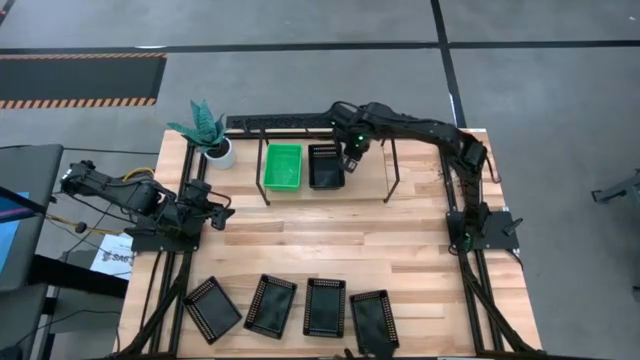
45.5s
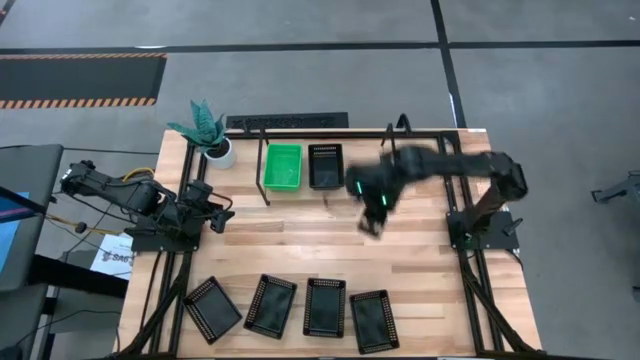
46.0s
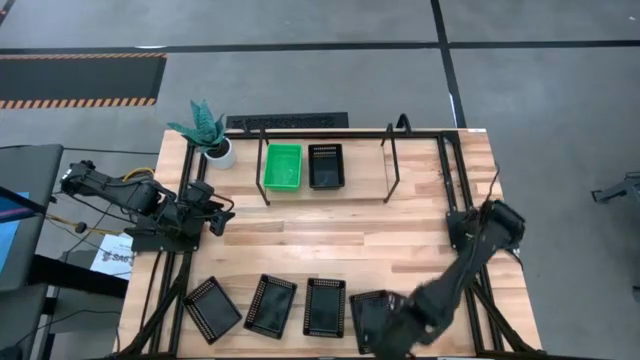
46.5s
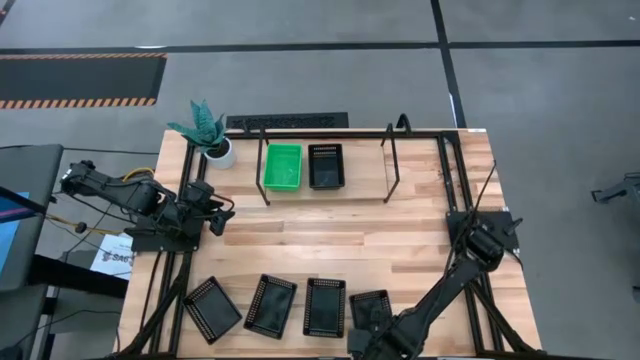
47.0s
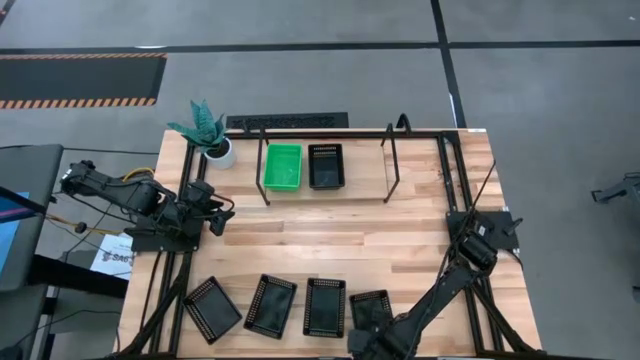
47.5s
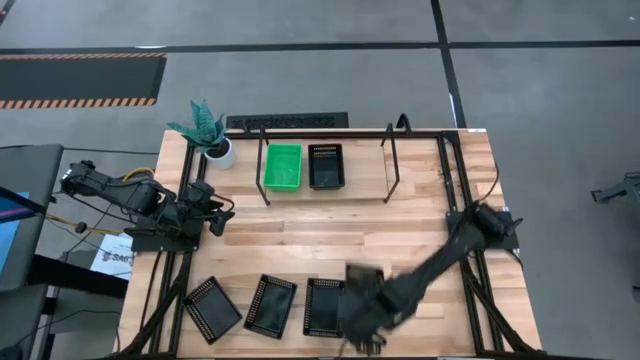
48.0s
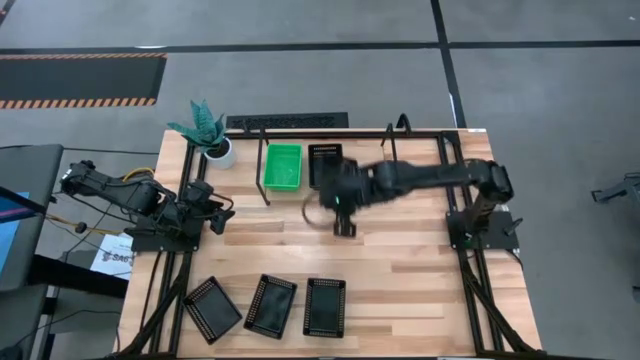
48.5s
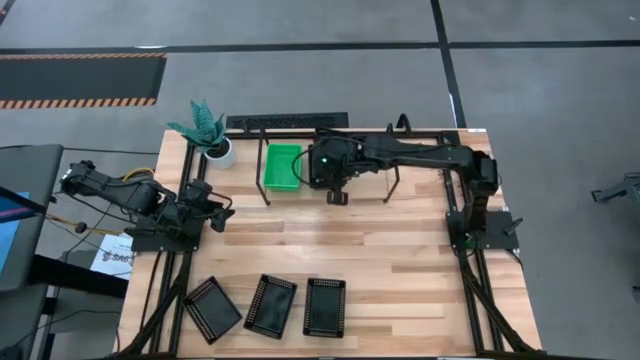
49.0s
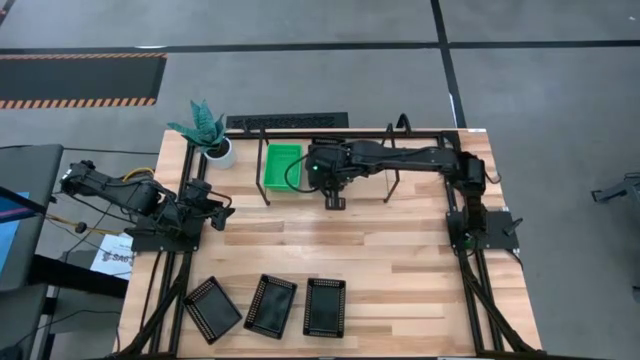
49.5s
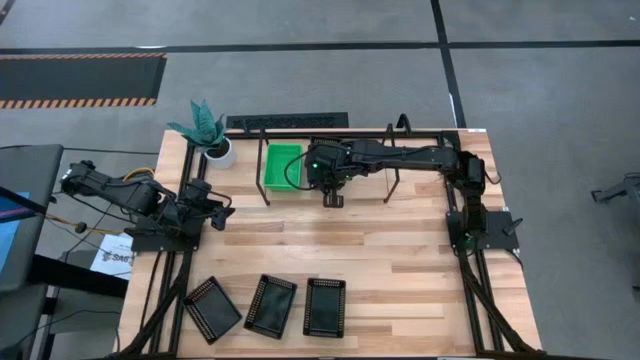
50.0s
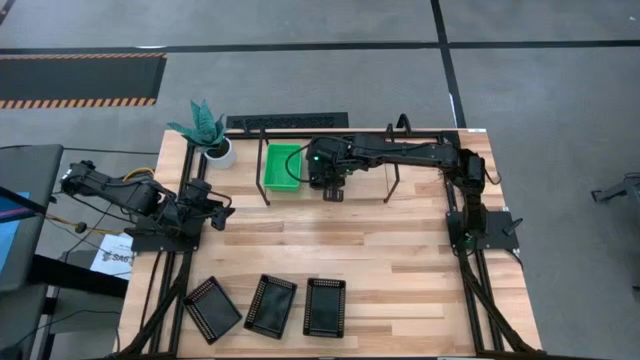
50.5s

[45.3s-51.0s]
Task: Stack baskets on shelf by color
Stack the black bin on top of the black stacked bins on the shelf

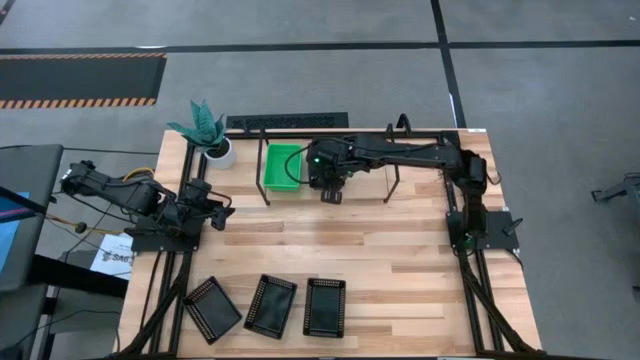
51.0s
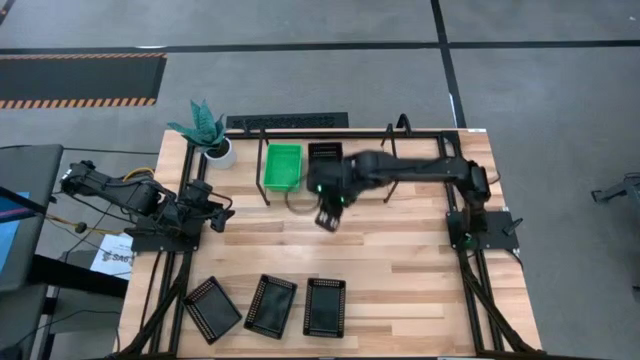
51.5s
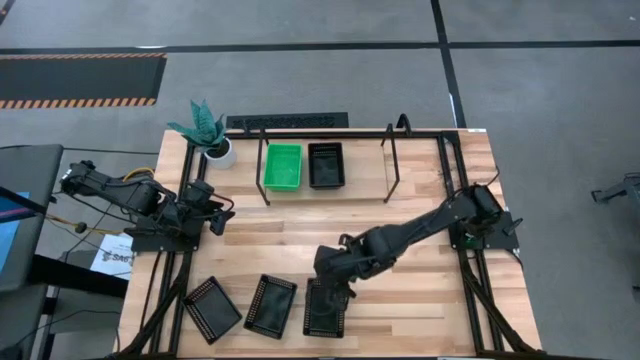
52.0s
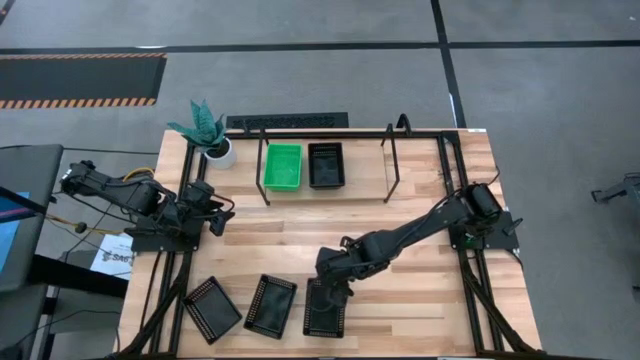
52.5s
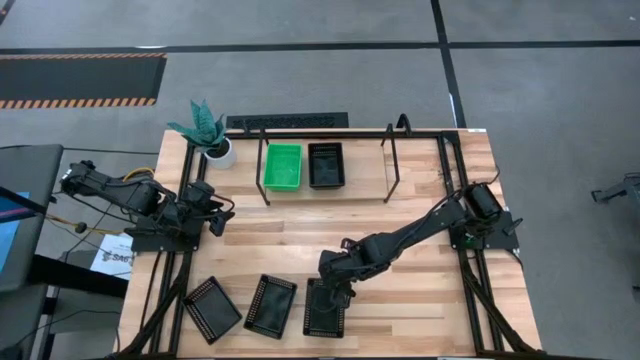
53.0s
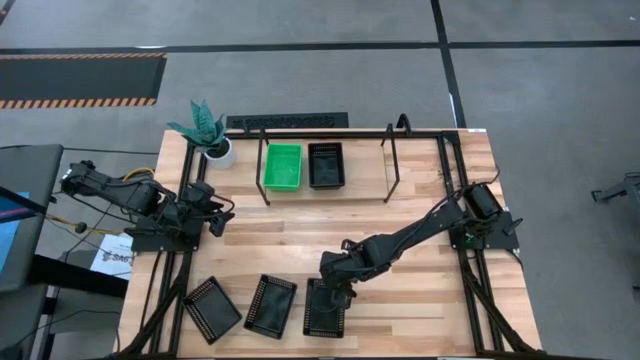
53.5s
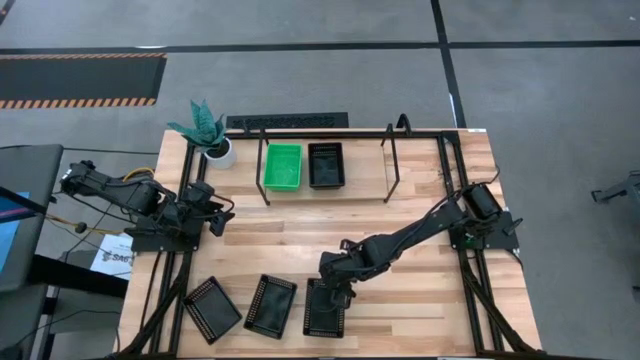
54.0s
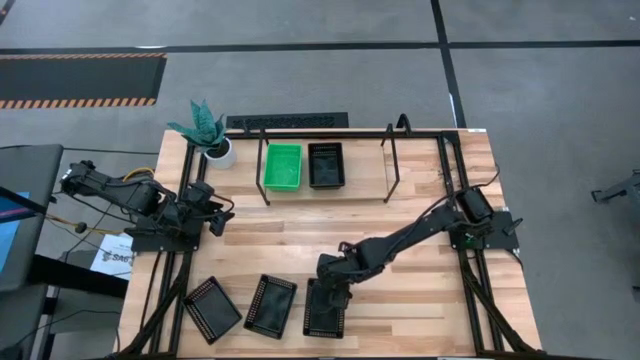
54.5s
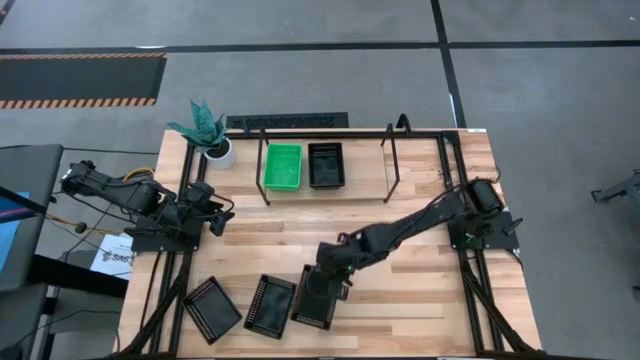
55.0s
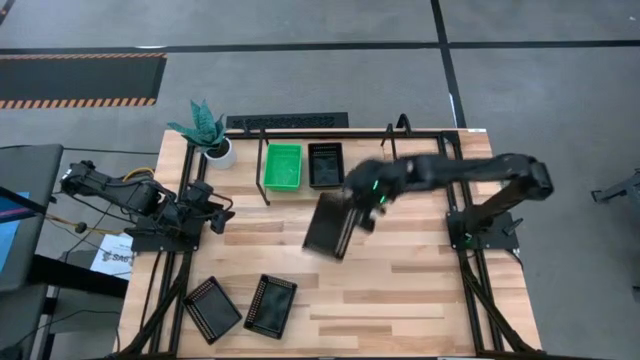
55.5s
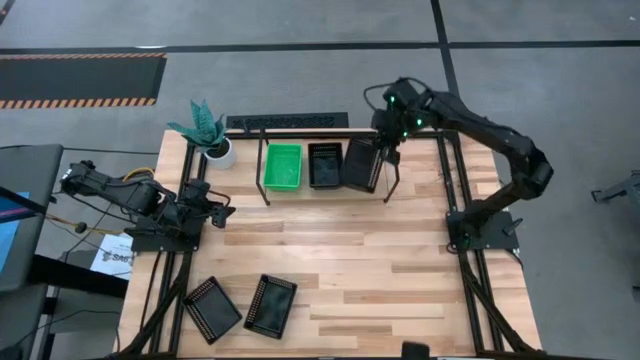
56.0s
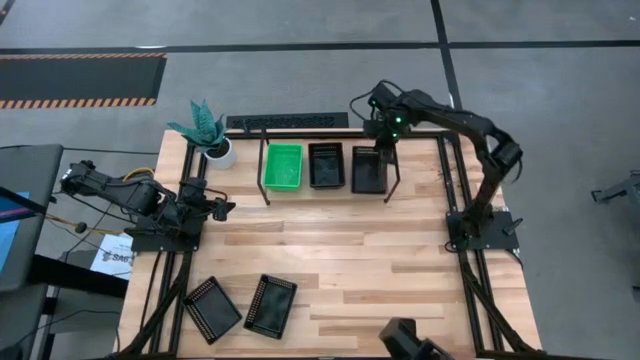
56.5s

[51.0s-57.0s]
Put the black bin on the shelf

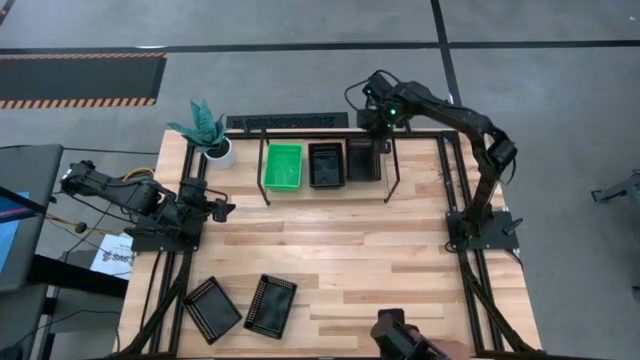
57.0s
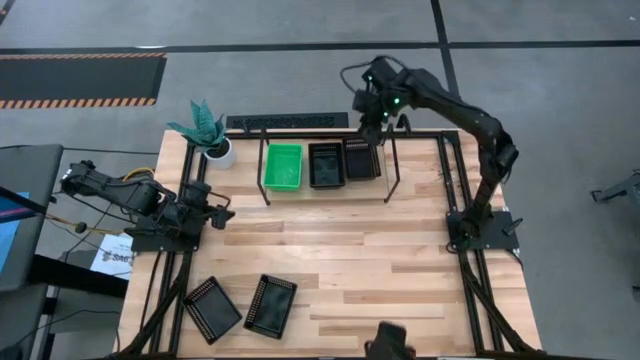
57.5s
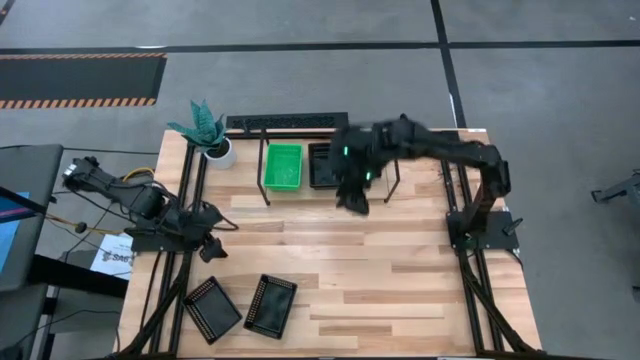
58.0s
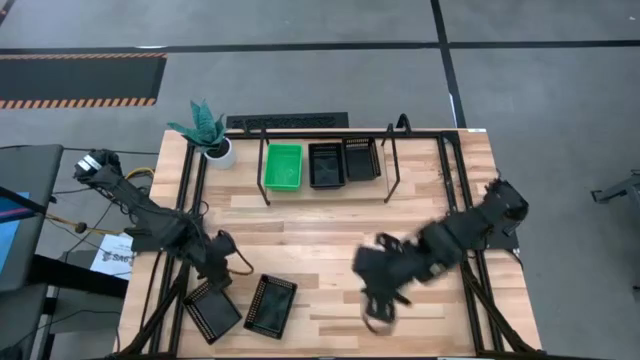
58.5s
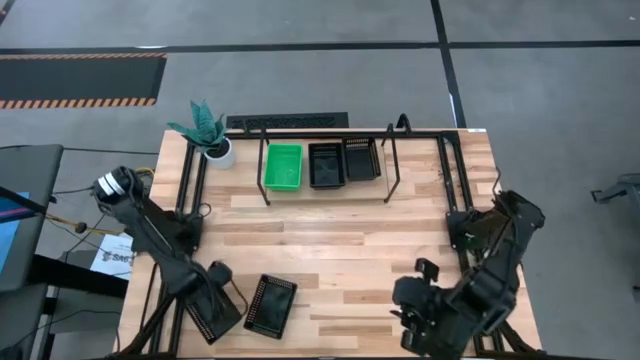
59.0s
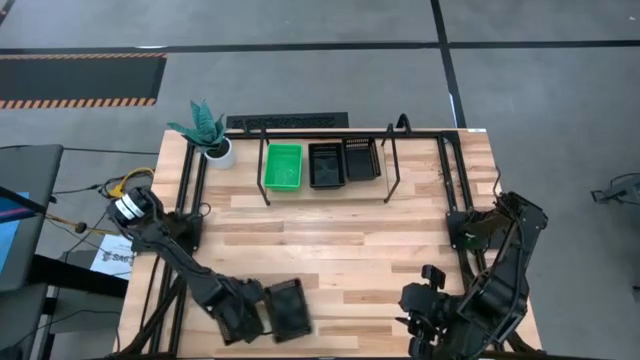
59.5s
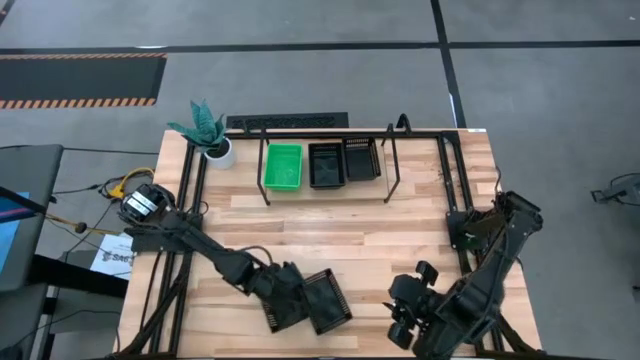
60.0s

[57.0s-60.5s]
Move the black bins to the middle

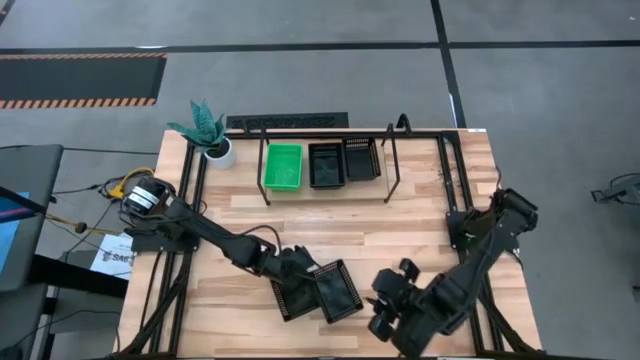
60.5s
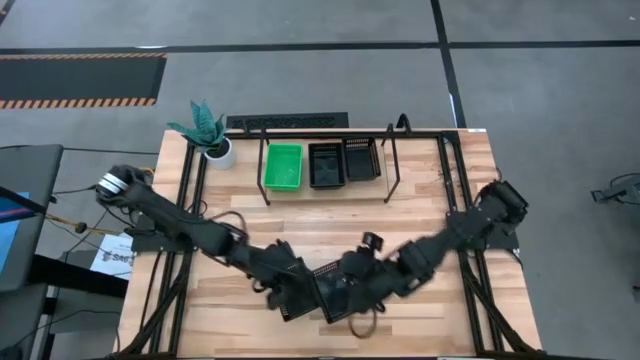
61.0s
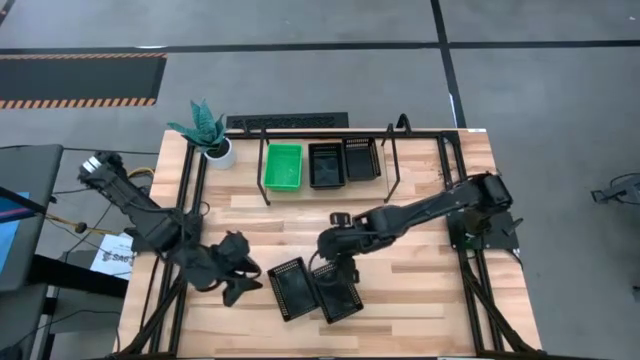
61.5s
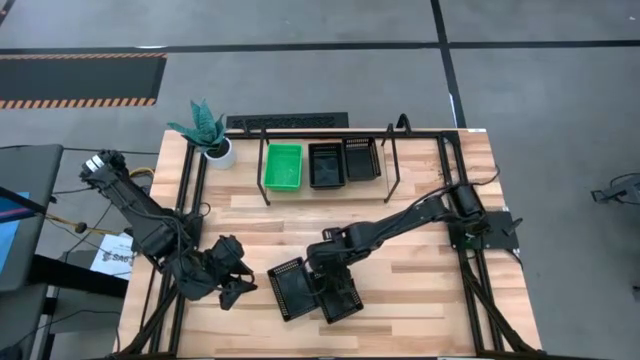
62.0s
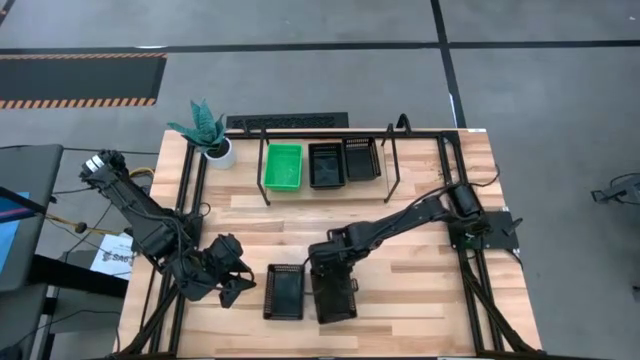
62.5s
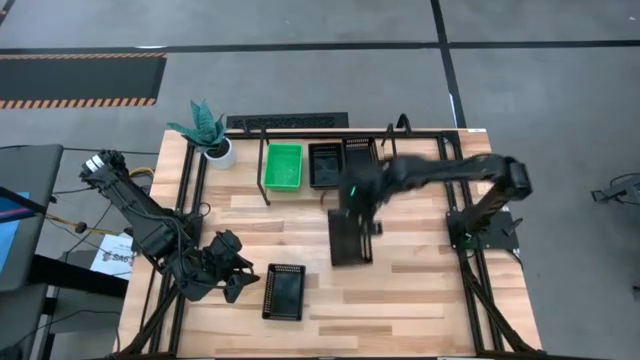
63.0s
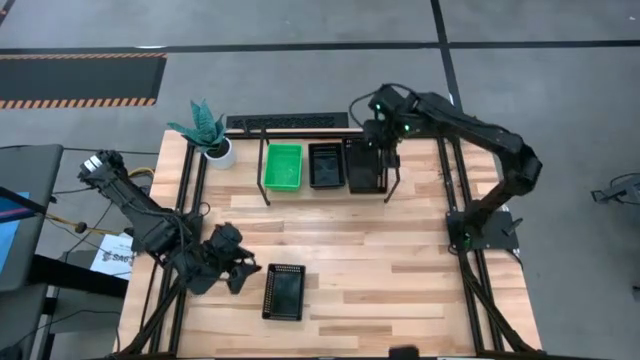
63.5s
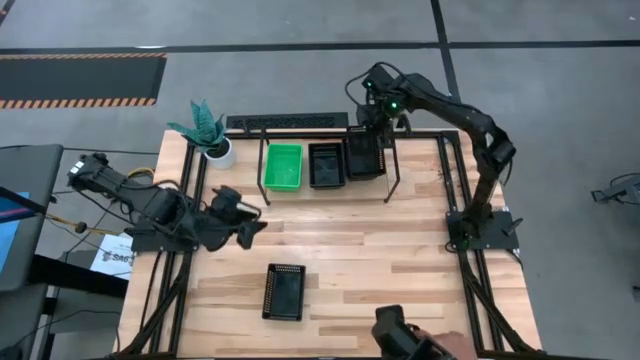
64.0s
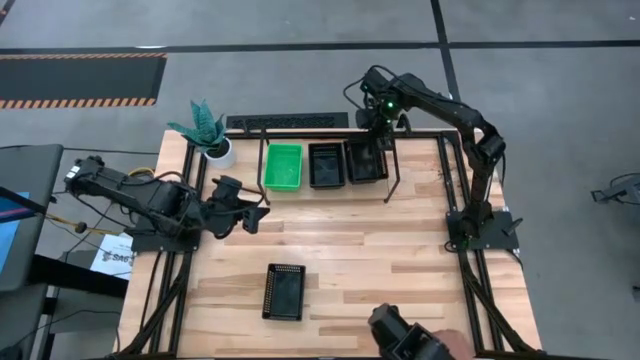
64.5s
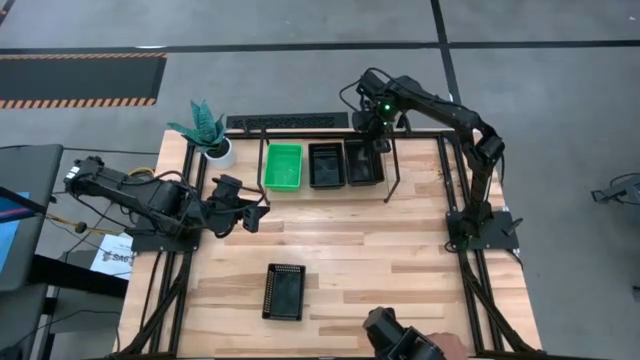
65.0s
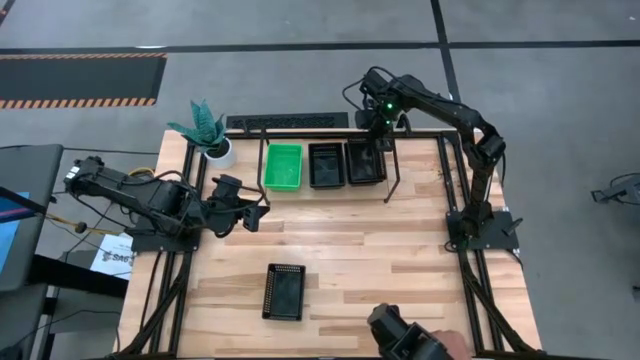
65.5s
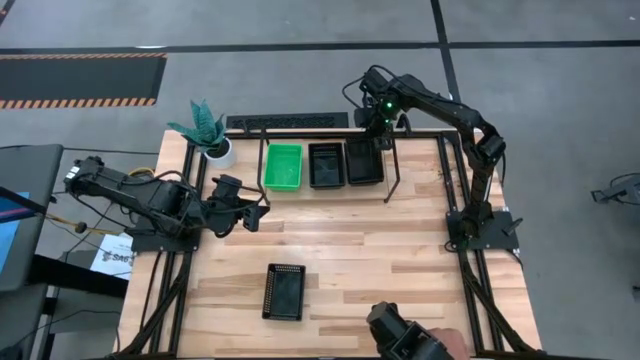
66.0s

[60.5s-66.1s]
Stack the black bin on top of the black bin on the shelf
